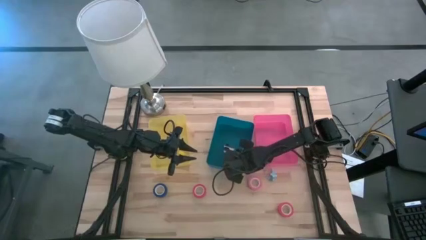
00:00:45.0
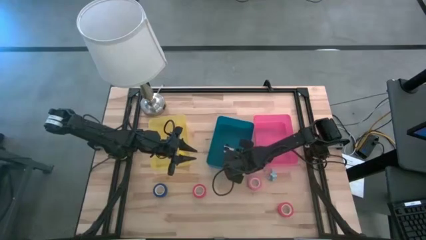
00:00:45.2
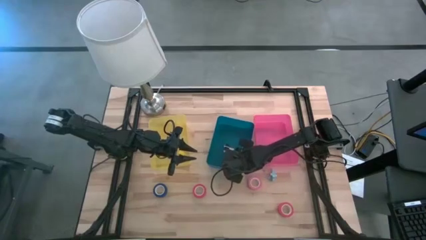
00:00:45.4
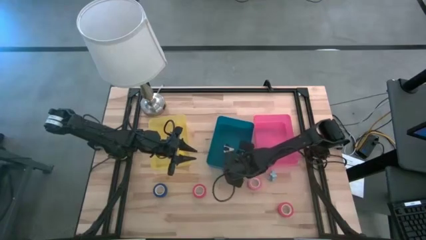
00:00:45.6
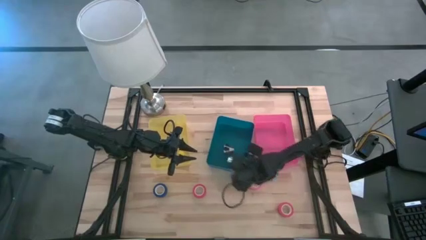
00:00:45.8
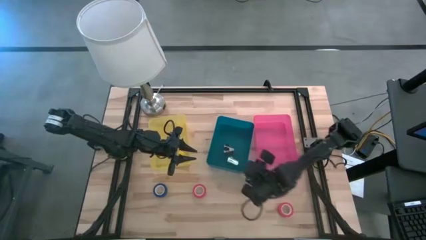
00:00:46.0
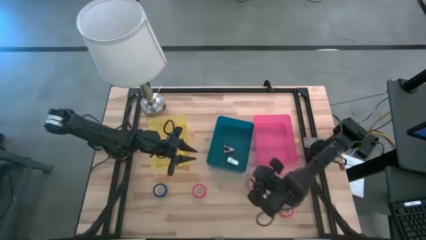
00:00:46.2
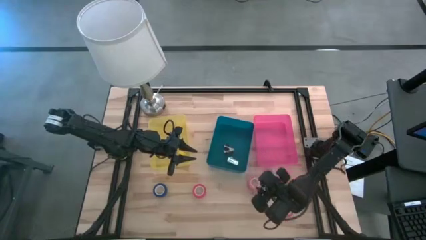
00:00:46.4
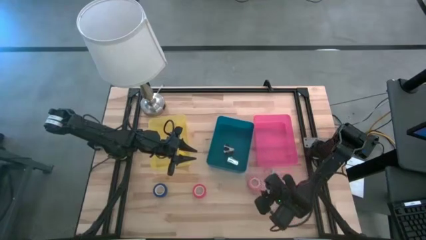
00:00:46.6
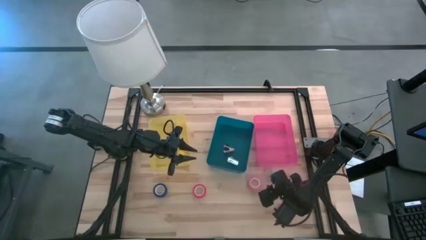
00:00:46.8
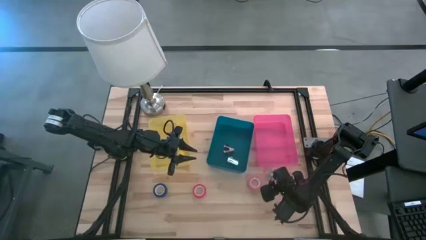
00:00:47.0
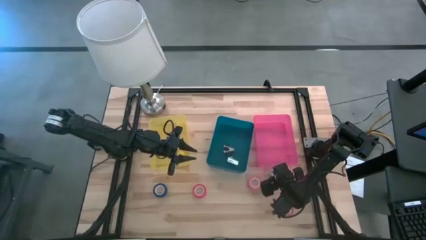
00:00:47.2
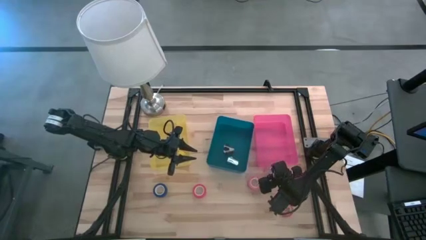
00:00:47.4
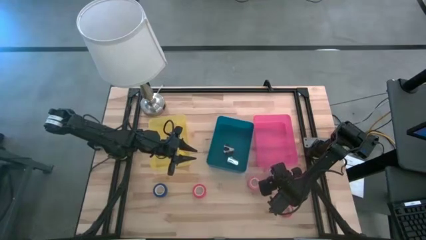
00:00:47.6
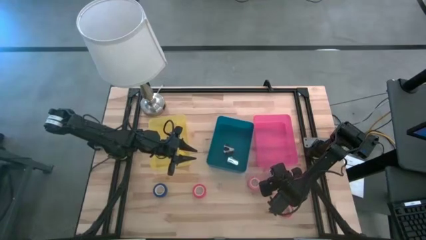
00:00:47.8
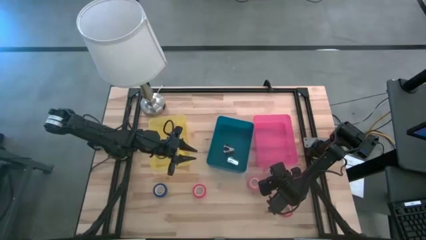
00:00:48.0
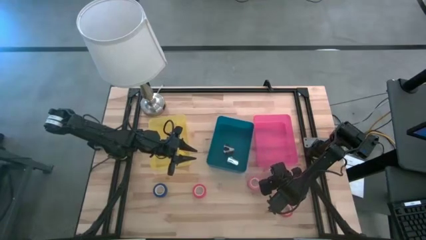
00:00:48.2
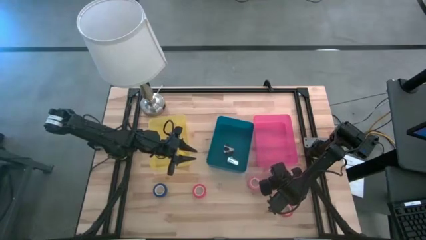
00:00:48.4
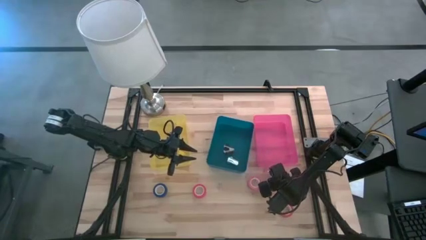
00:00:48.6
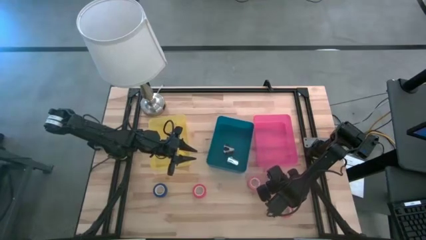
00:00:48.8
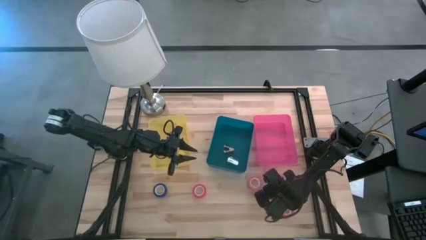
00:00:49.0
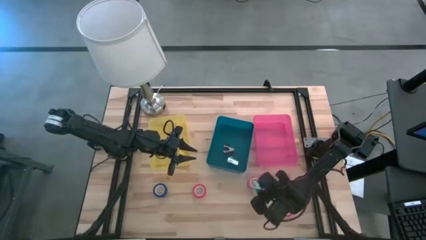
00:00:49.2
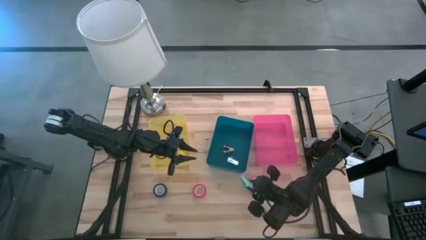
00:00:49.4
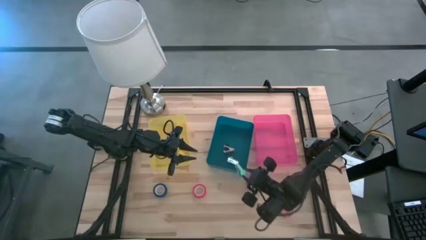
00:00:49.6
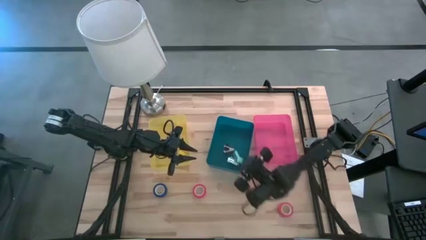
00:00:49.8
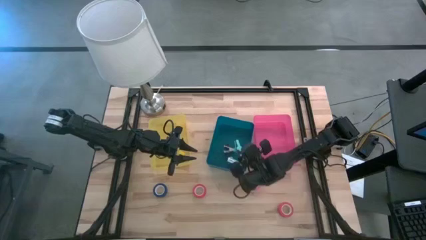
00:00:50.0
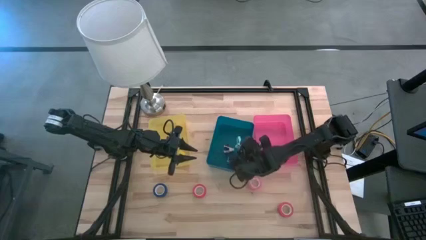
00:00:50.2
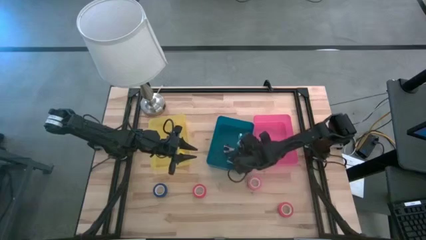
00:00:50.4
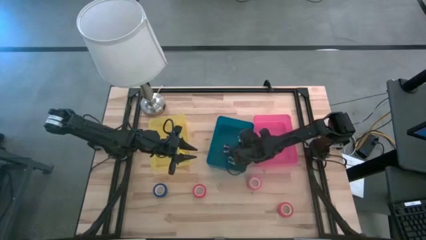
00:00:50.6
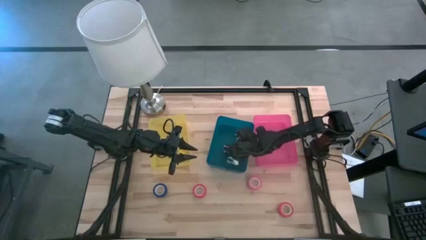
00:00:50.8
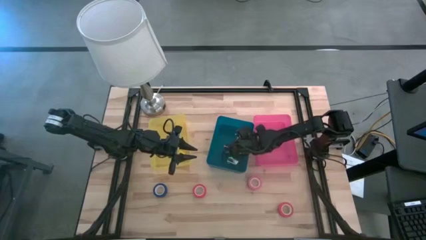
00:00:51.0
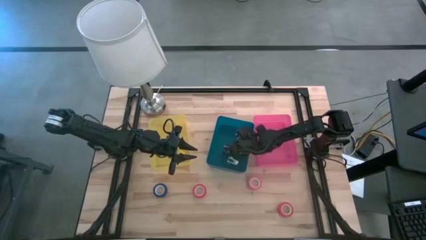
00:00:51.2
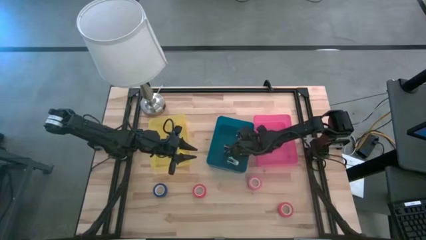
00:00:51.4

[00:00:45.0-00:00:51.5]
Task: Pick and place Stapler, Stapler remover, tape
Put the light blue staple remover into the blue bin

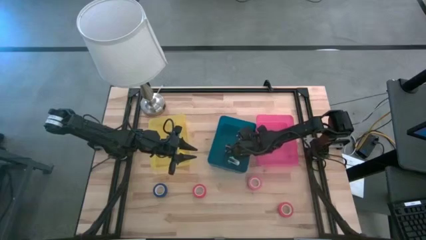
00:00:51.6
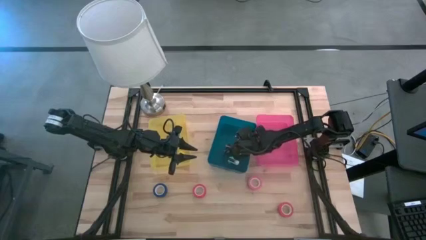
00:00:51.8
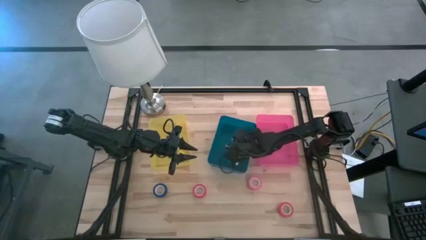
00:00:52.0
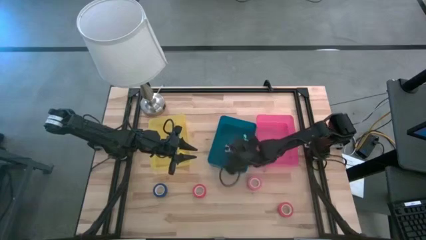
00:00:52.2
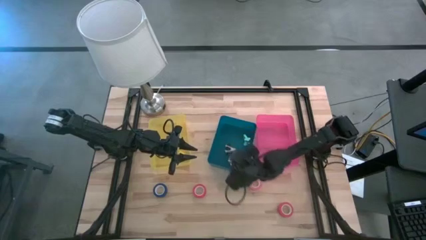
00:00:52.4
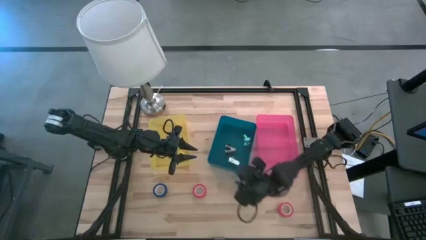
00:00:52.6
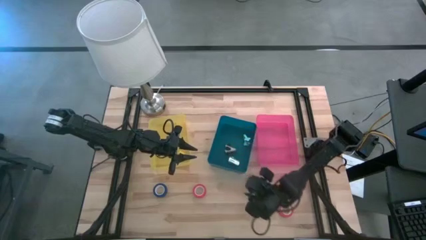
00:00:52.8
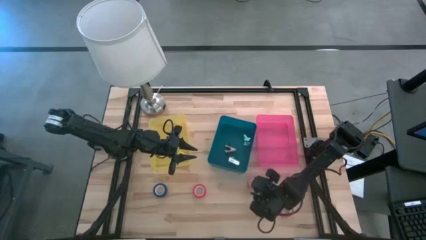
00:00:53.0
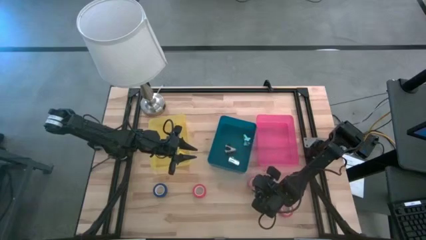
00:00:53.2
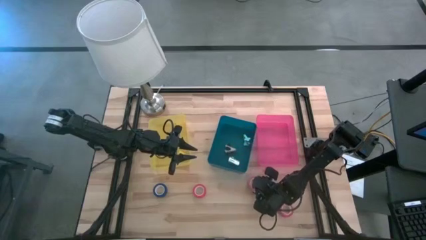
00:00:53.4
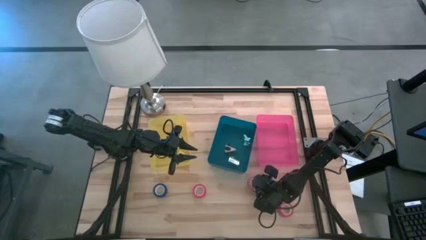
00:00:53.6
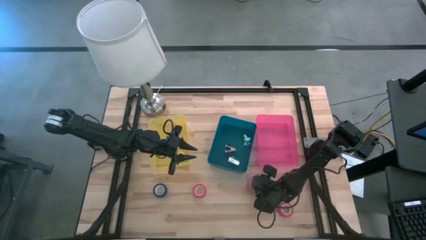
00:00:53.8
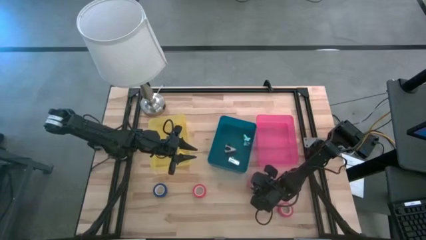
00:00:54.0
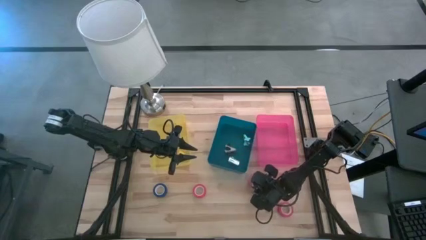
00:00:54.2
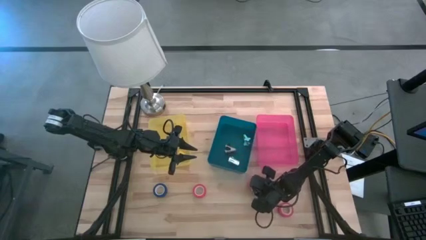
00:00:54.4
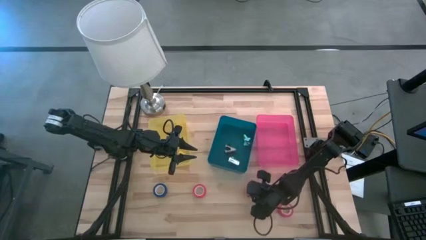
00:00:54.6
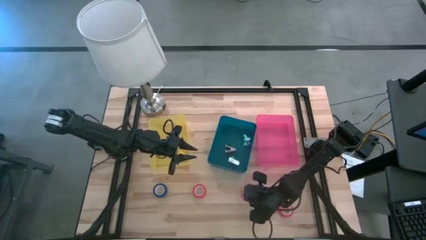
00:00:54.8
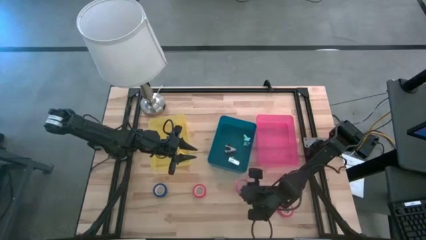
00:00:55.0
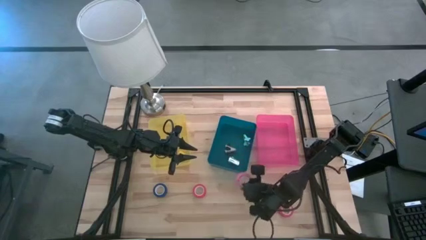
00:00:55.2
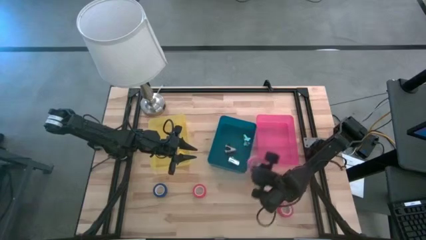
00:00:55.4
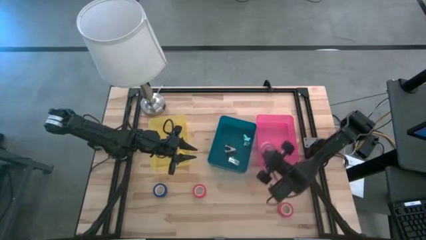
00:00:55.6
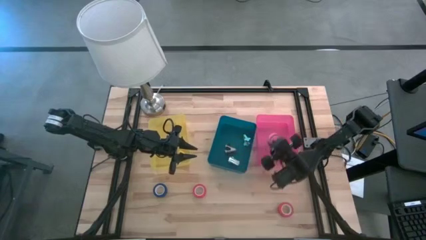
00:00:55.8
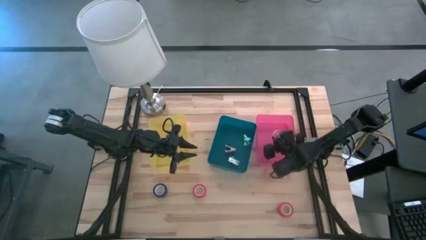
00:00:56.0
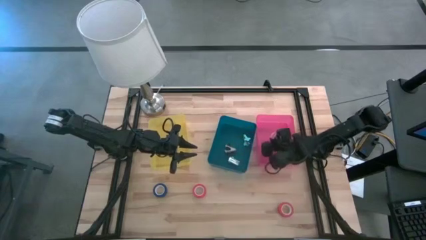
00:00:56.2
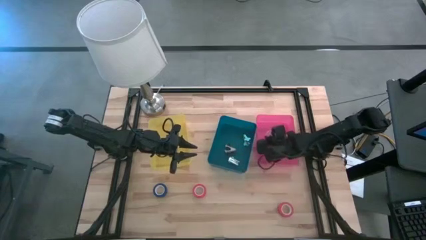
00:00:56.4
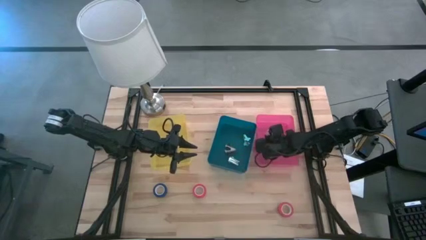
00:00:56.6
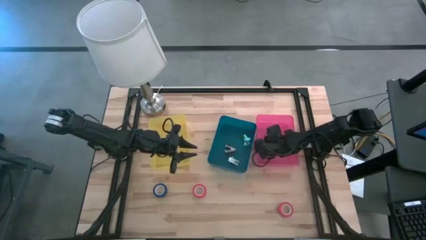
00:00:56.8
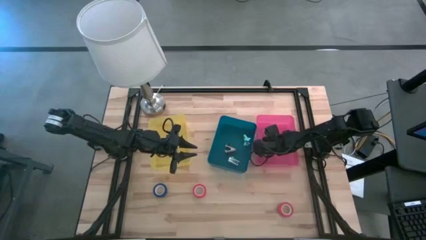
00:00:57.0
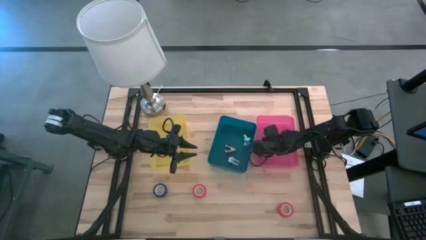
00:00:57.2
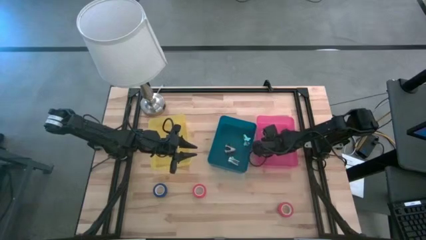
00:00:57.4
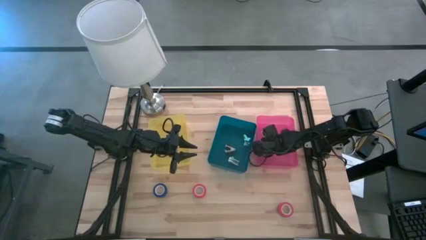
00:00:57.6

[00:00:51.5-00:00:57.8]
Put the pink tape into the pink bin

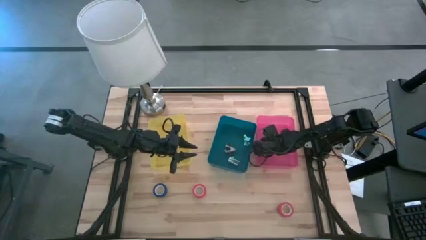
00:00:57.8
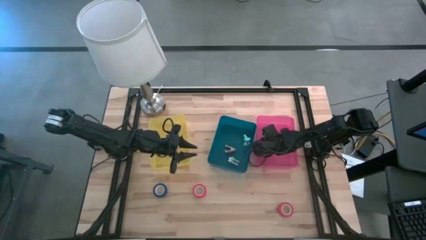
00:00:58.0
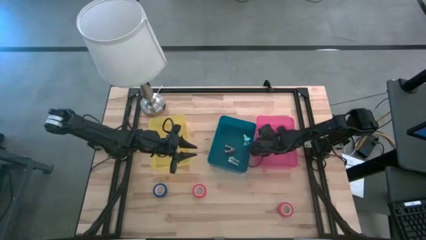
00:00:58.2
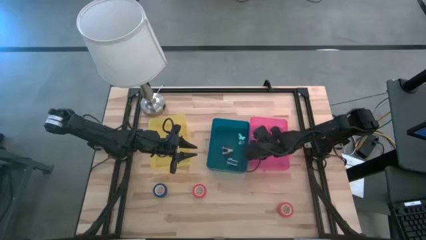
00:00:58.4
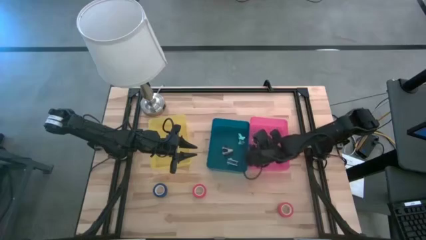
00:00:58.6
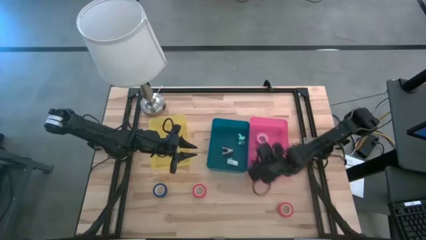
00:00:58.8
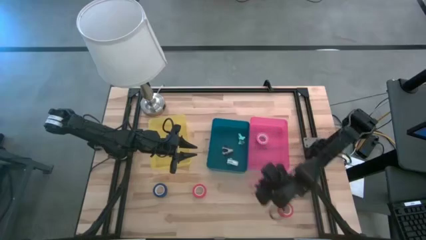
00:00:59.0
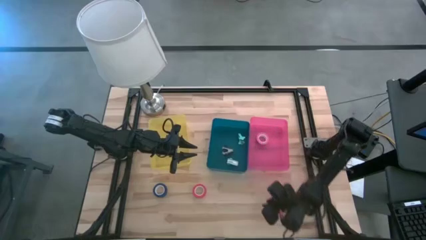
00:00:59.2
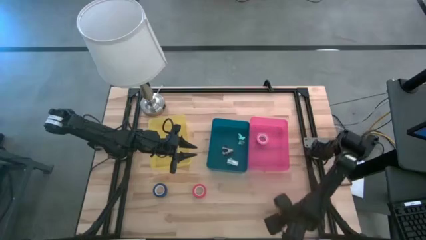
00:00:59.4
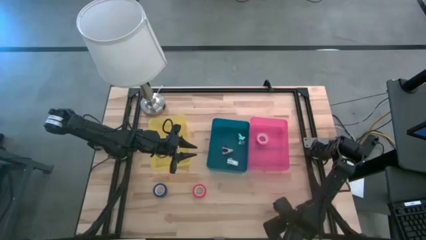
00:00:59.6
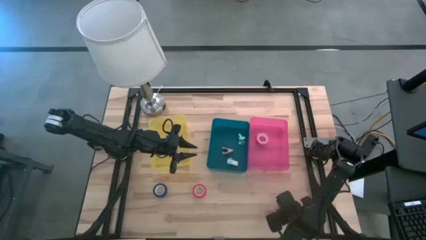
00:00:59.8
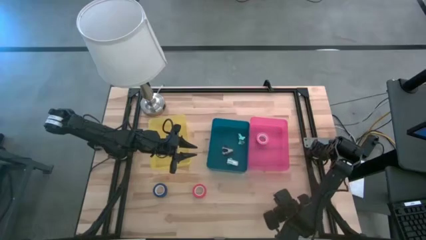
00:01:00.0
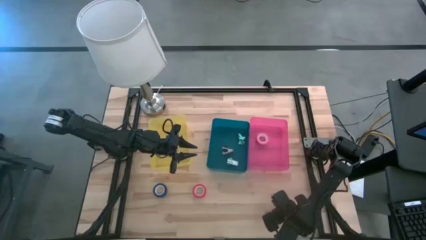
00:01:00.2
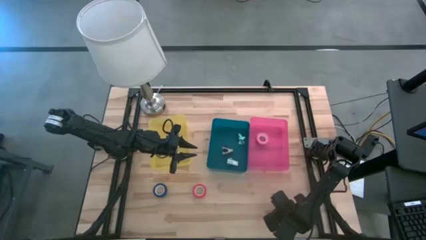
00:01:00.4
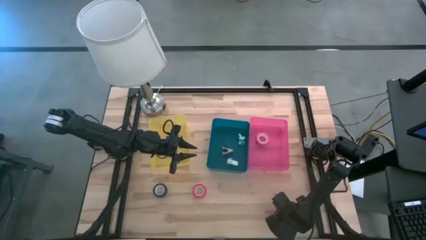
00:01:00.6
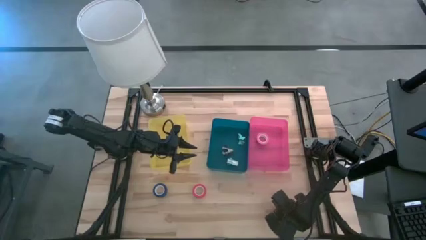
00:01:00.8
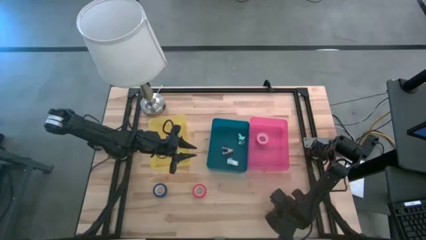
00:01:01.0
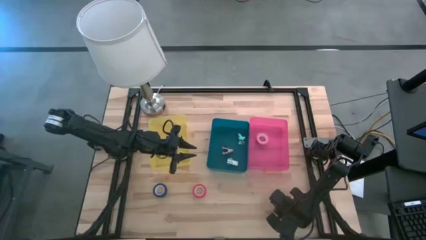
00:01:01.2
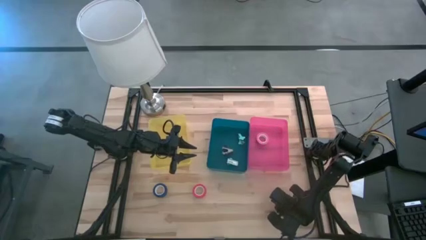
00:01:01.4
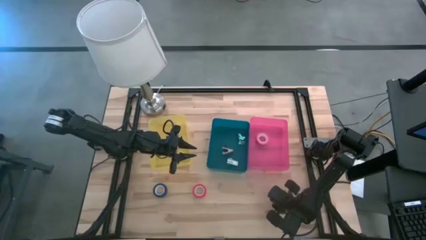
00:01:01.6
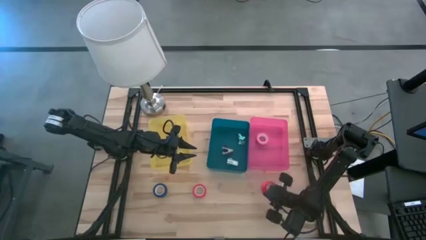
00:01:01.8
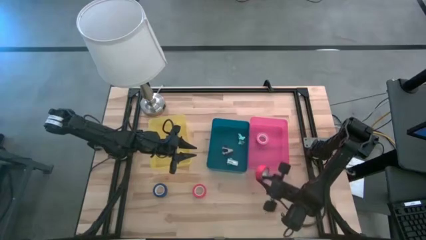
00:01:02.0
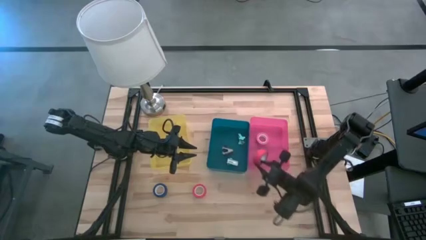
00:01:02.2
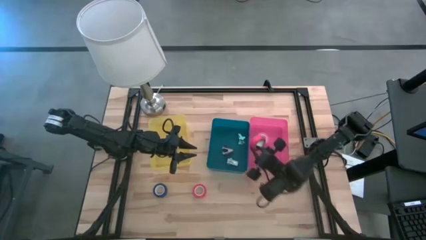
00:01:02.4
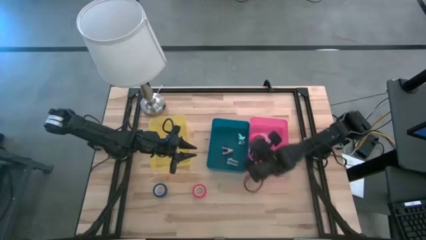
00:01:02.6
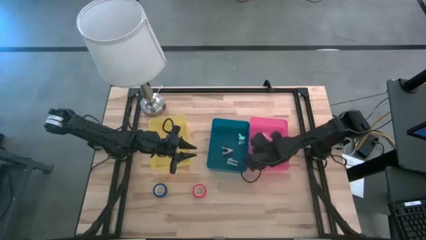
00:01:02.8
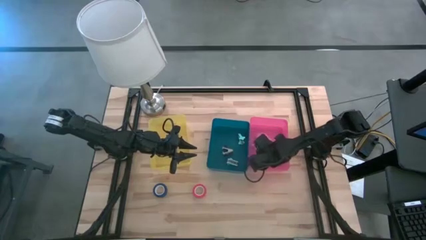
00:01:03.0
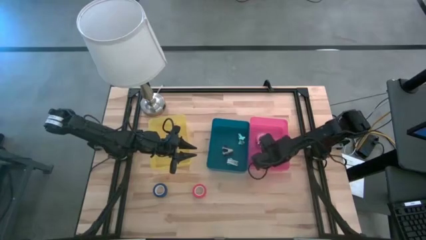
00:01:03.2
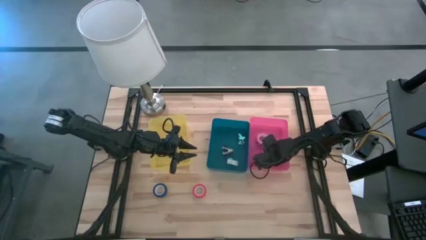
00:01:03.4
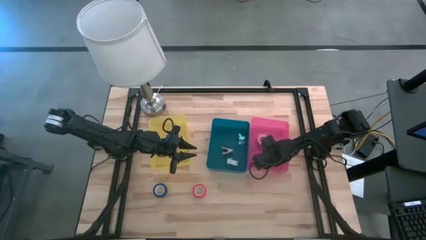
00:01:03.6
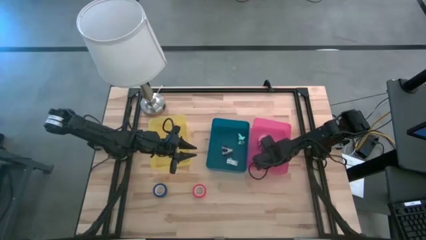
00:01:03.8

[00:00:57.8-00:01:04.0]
Put the bottom red tape into the pink bin
